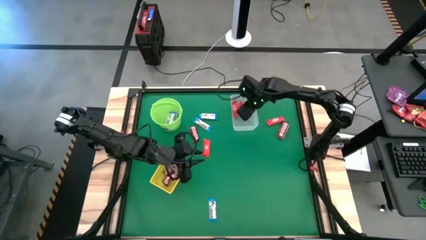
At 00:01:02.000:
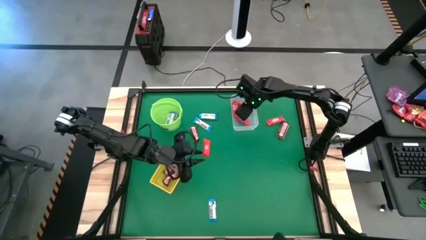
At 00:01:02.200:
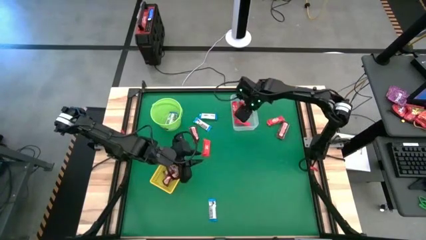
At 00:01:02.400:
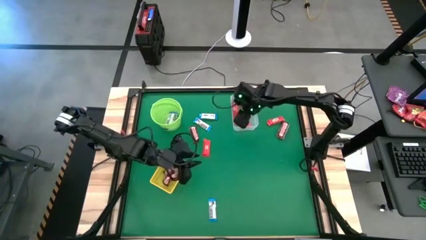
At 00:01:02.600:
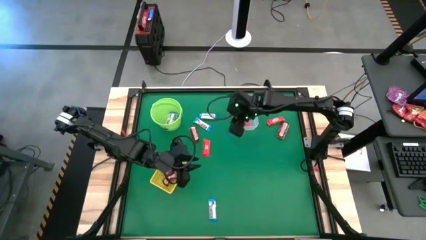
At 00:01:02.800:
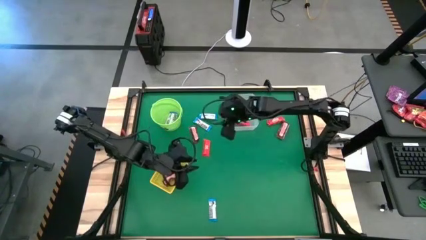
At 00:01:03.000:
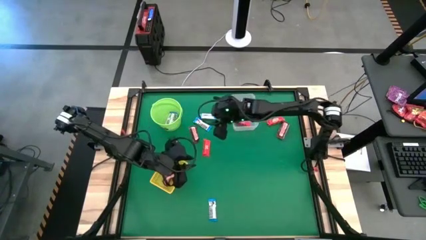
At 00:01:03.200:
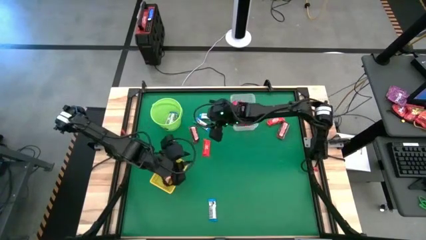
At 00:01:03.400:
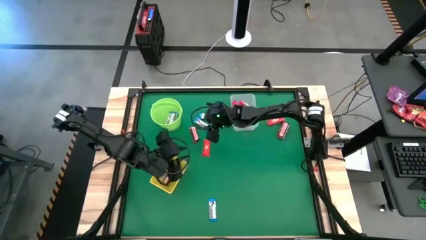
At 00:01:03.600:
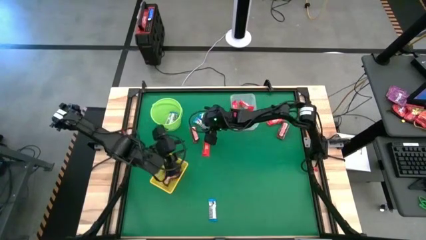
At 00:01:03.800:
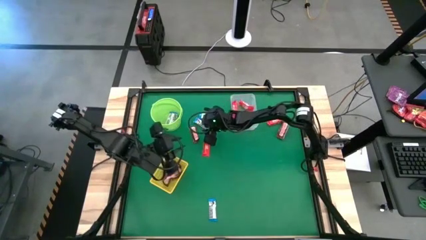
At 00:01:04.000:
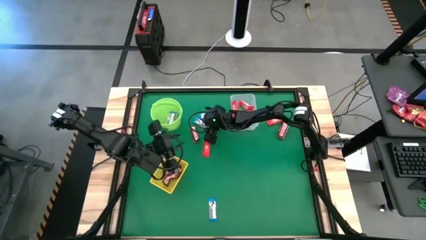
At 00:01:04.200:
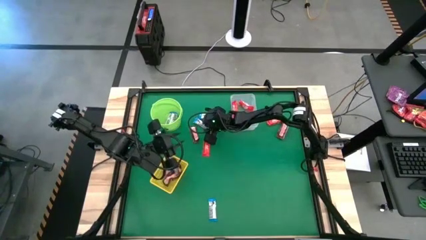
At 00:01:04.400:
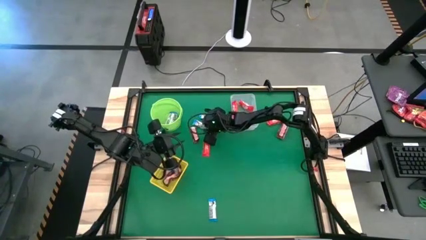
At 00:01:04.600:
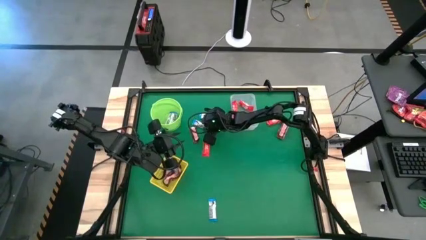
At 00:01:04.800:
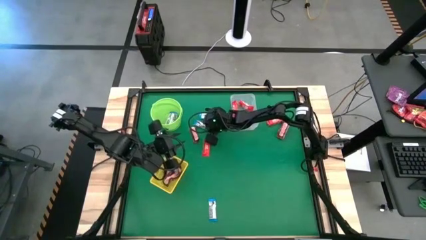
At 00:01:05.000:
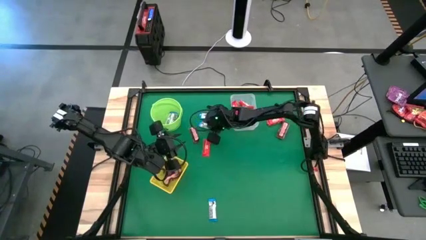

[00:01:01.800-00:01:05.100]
Task: Sort candy by brand, put in halloween buckets
Put the white chocolate into the green bucket

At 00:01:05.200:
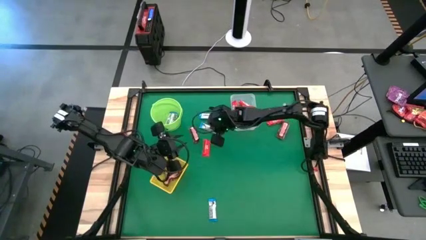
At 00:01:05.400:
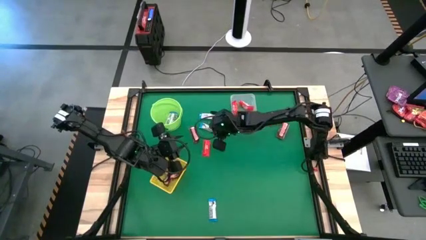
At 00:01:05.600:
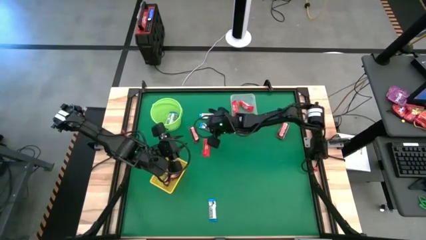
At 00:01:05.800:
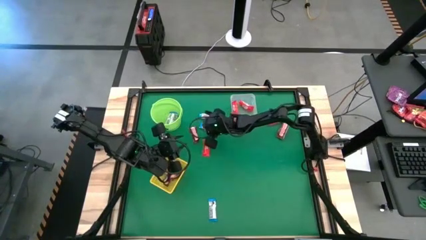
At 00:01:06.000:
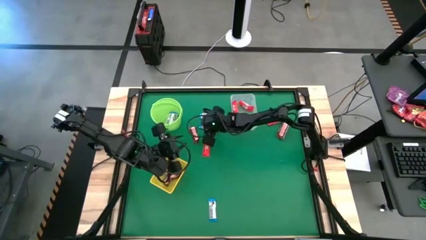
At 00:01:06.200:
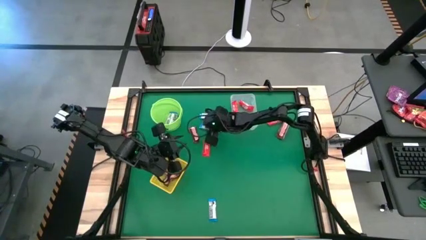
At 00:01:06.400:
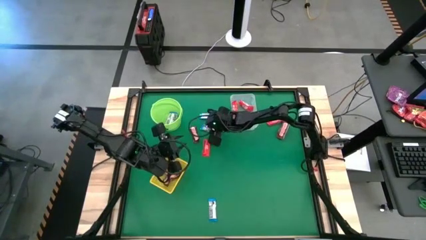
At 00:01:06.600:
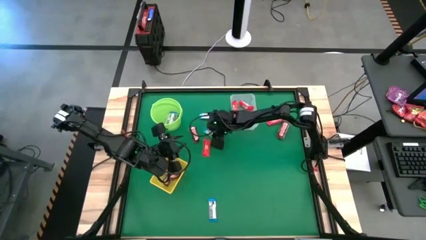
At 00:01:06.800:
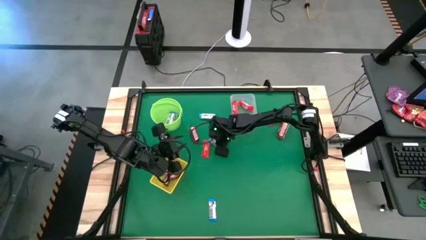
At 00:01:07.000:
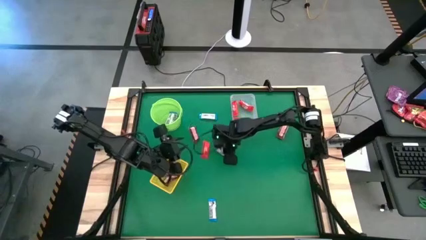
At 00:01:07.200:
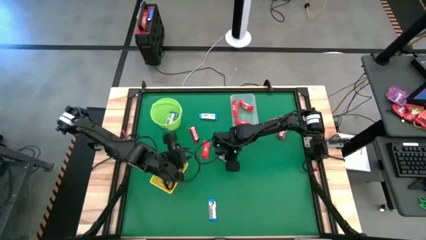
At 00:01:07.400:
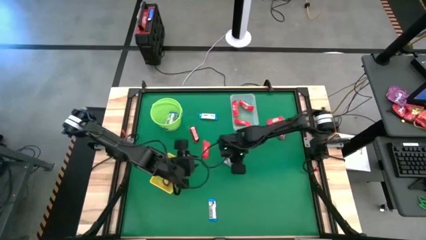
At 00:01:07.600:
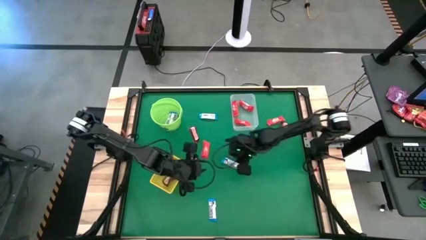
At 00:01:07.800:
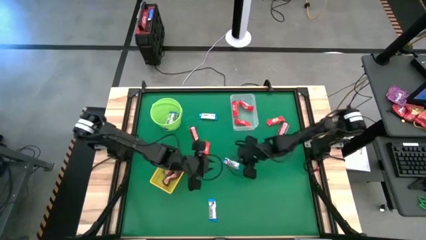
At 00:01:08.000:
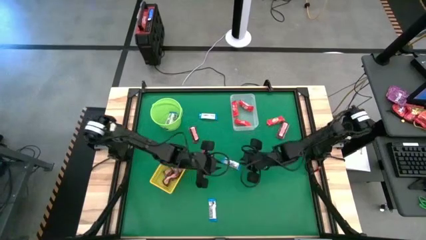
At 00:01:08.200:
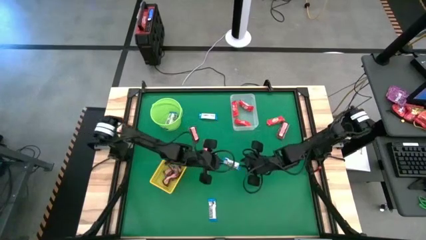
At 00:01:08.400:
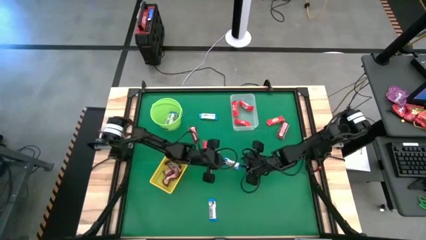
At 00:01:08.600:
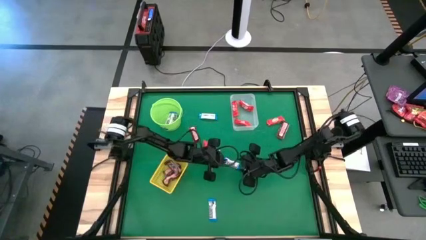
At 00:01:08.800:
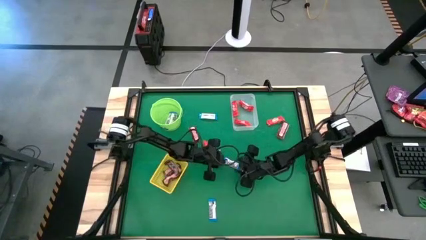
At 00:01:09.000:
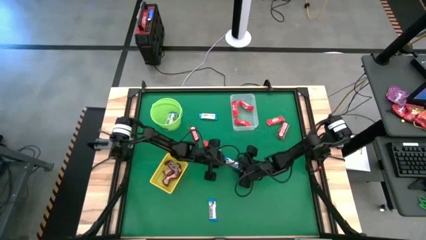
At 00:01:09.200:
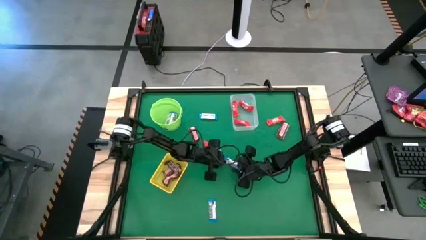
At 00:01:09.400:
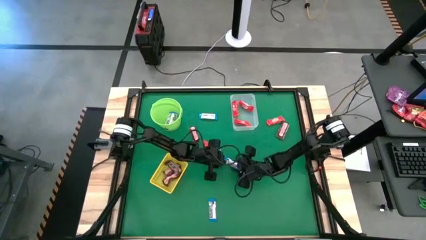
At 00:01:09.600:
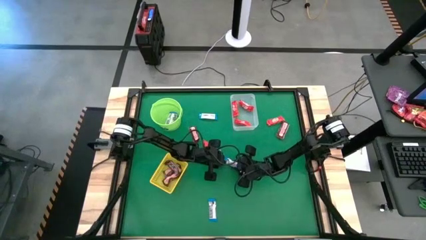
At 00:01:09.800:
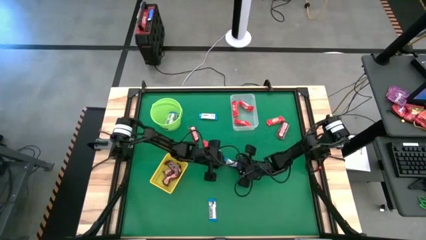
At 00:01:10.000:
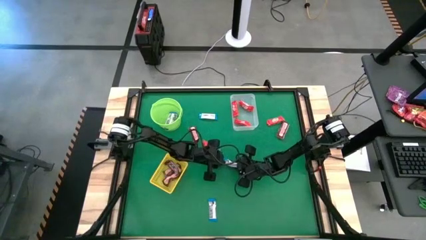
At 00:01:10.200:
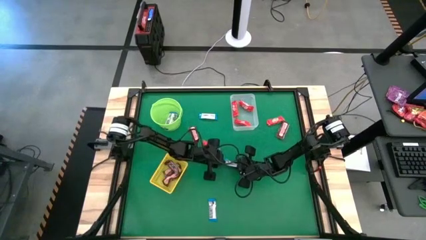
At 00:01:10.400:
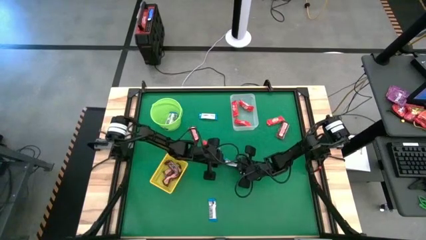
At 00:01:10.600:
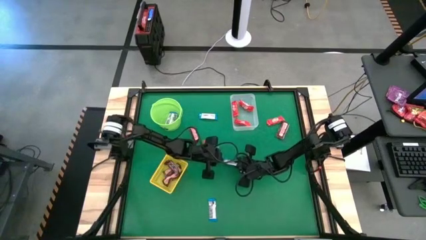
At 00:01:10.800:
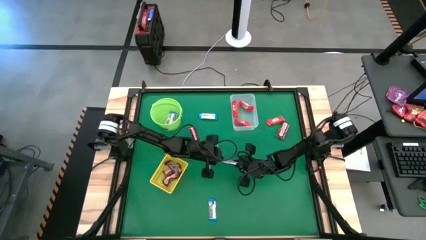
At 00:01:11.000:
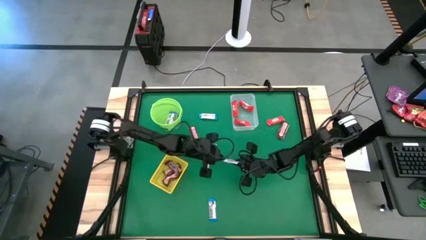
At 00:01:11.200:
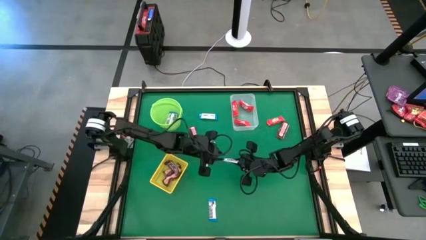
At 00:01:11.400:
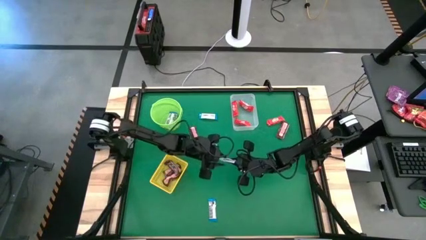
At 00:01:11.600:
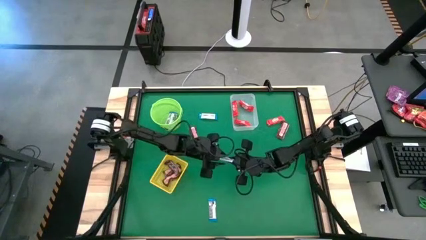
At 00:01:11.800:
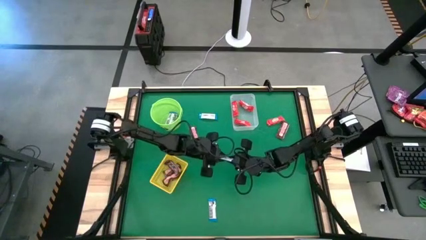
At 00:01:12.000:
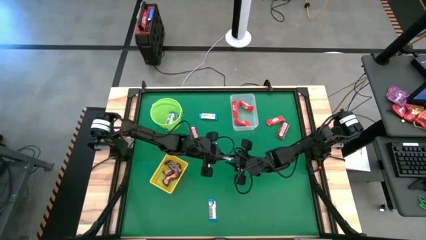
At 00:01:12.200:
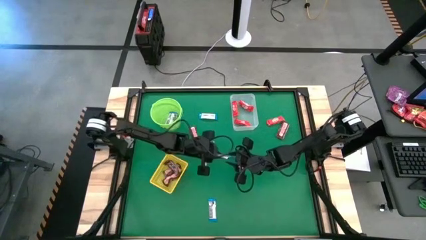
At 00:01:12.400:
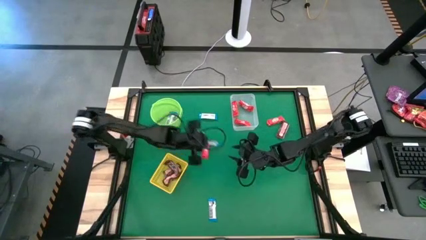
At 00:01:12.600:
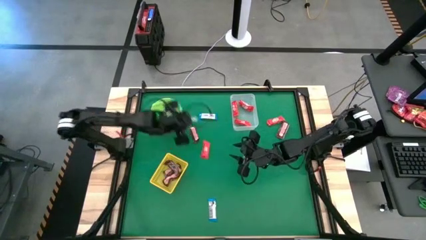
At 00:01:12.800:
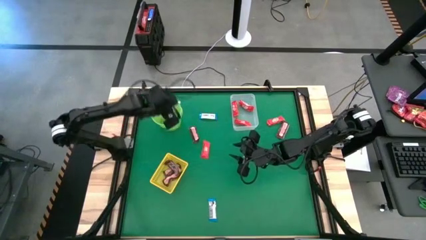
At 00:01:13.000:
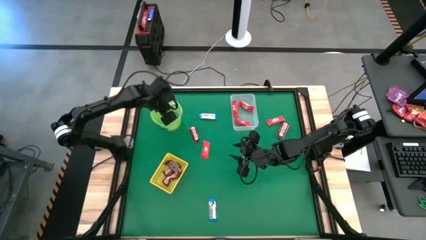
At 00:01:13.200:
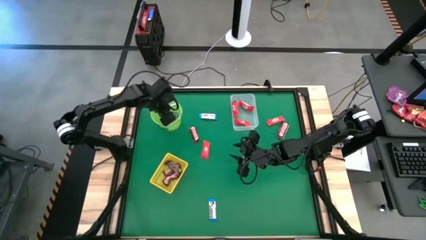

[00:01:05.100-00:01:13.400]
Put the white chocolate into the green bucket

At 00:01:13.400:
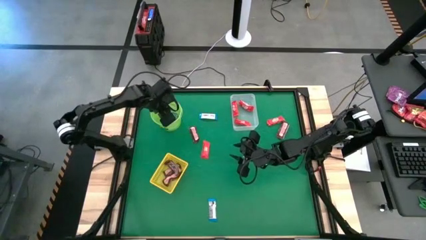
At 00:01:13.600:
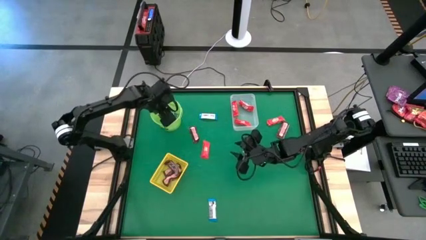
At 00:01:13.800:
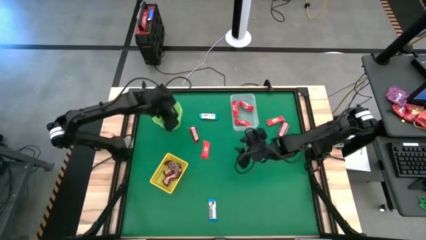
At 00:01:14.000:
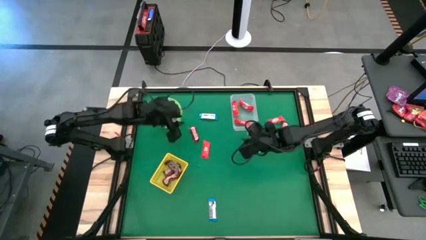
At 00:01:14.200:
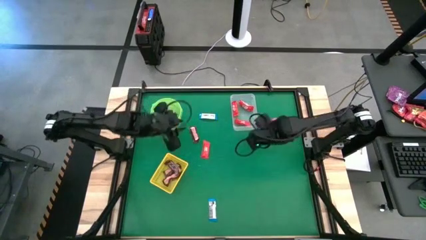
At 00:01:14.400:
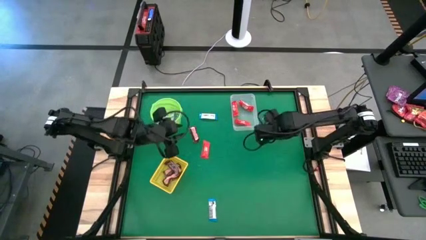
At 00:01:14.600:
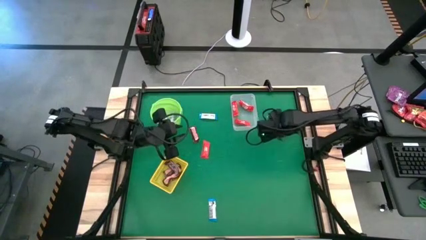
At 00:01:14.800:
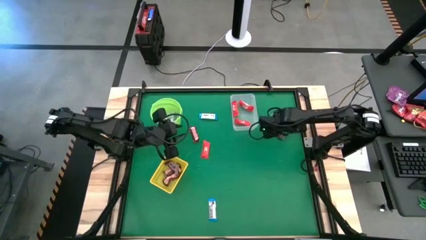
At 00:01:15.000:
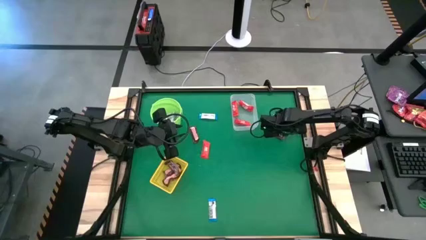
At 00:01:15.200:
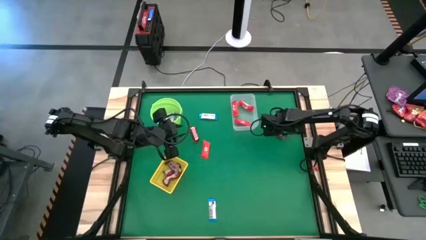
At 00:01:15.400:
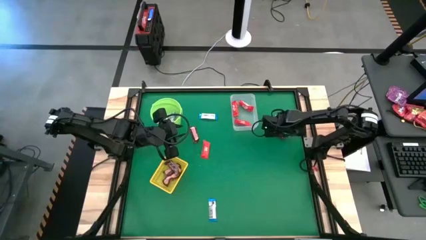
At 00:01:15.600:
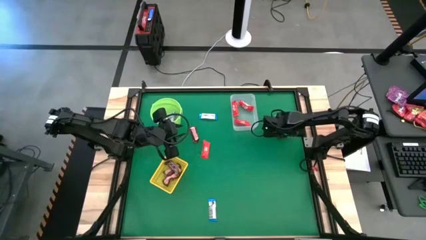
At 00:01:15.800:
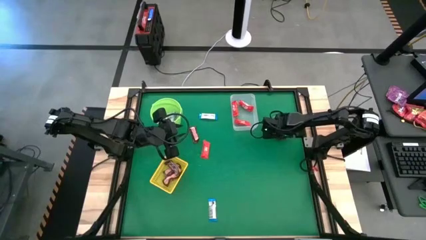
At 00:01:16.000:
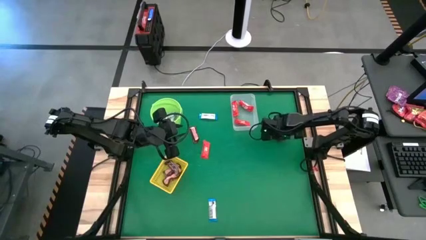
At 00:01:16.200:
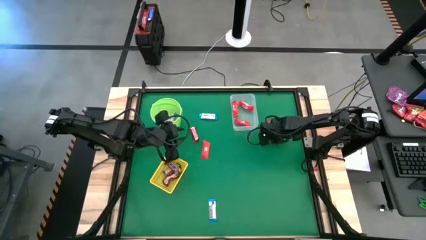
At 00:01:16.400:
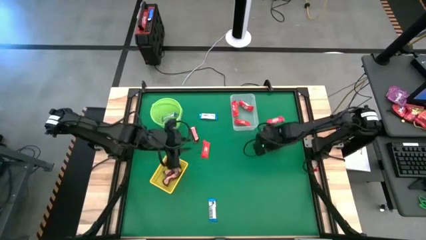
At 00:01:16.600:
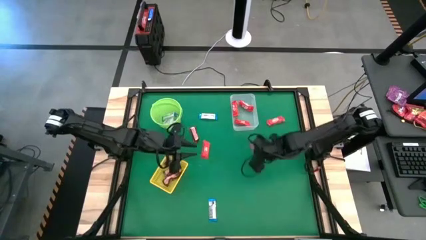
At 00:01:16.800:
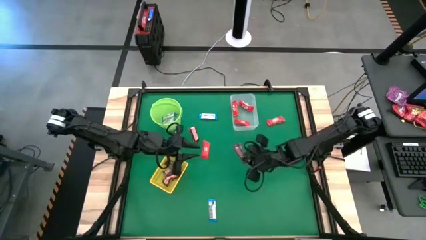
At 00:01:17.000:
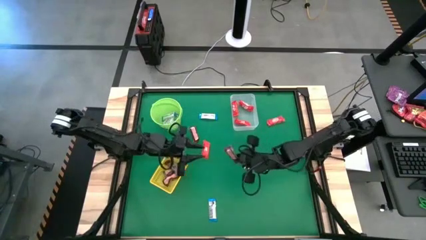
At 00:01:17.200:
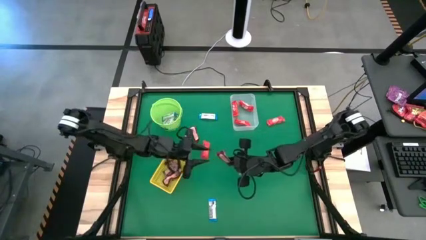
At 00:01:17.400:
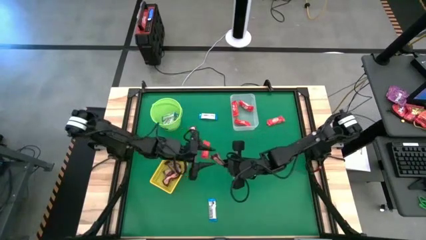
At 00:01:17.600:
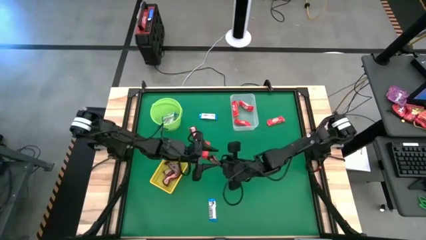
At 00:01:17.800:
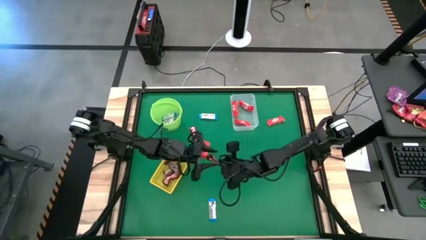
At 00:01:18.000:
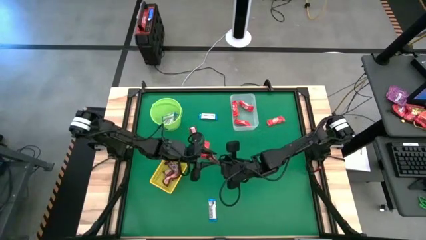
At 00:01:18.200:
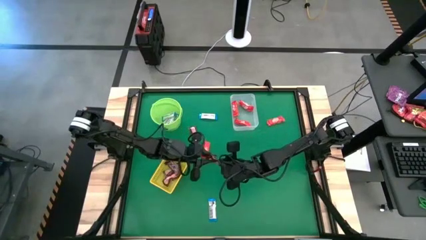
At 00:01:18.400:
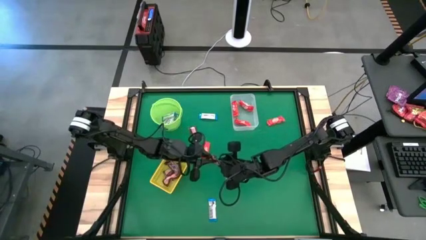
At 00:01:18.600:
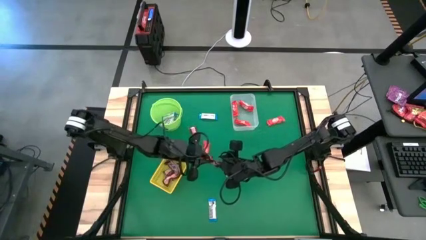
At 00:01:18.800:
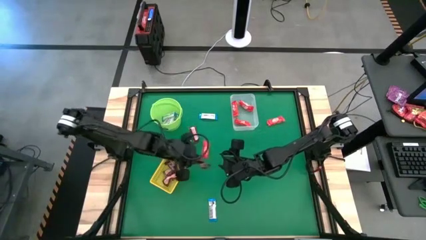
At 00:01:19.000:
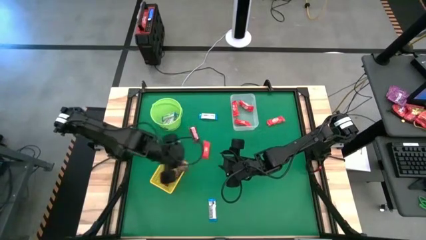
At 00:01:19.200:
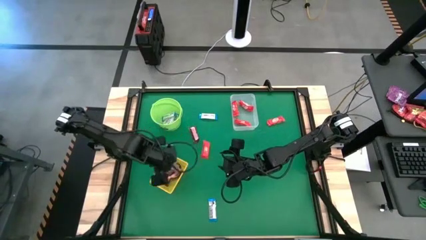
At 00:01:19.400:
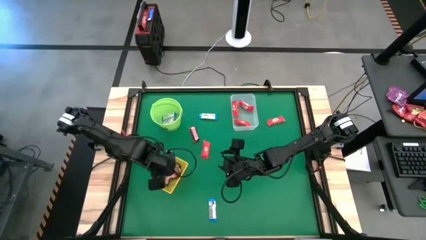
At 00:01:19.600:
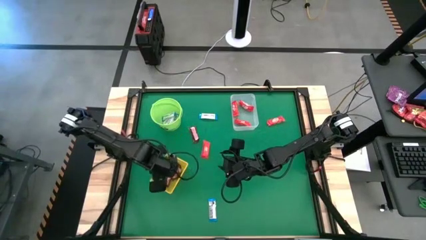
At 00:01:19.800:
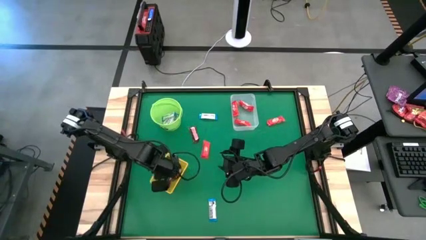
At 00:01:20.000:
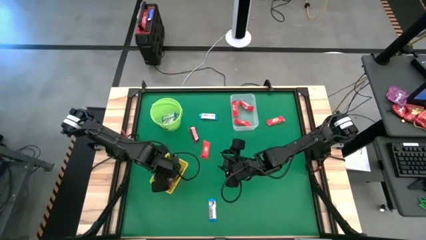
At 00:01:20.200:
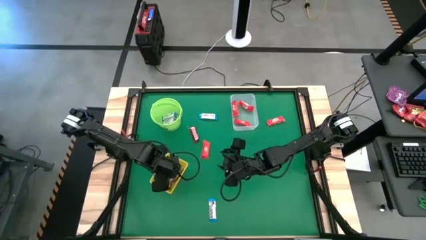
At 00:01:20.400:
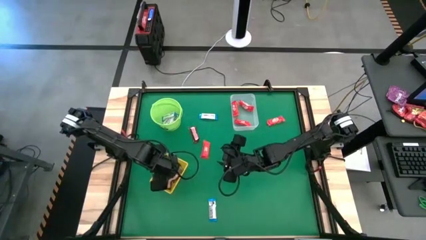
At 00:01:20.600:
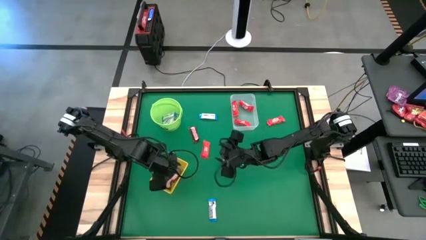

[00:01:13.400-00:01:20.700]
Put the brown chocolate into the yellow bin
